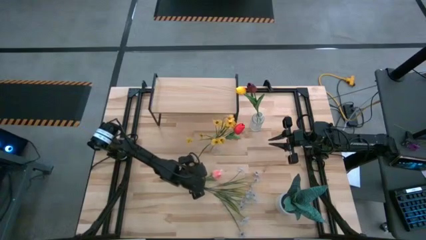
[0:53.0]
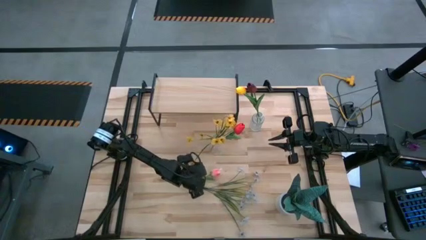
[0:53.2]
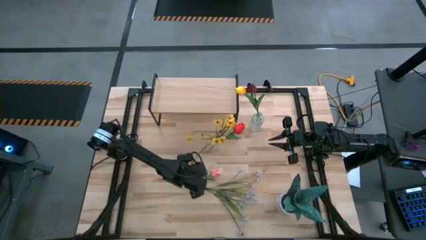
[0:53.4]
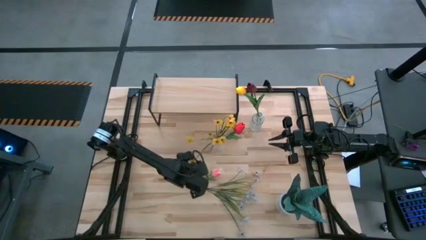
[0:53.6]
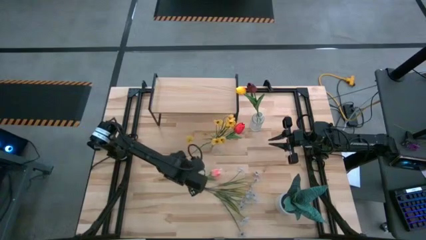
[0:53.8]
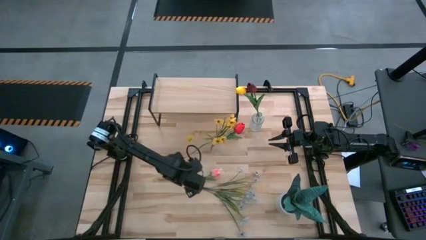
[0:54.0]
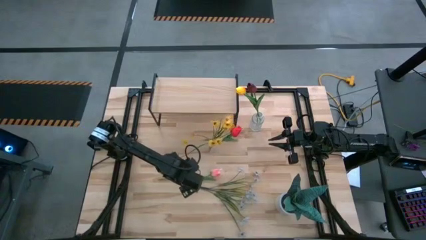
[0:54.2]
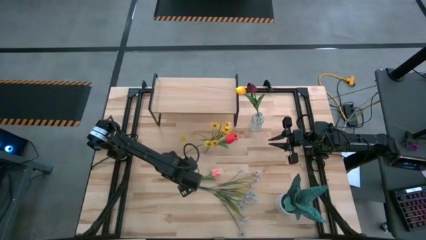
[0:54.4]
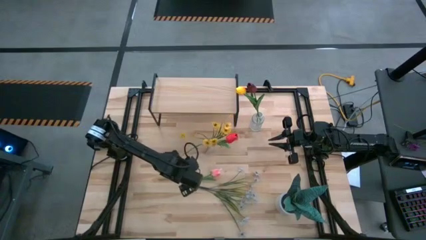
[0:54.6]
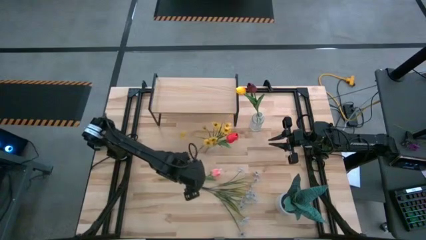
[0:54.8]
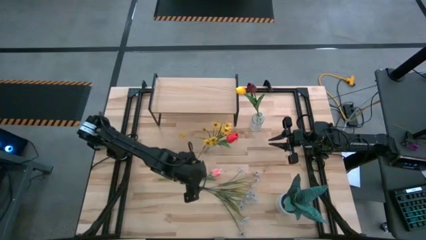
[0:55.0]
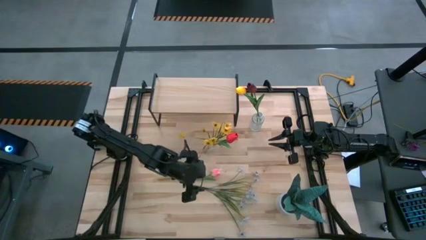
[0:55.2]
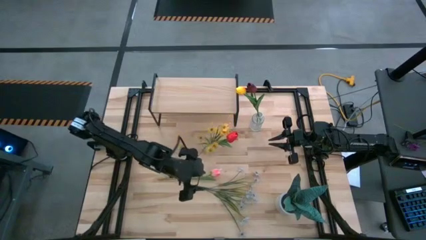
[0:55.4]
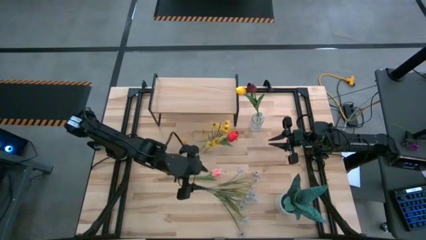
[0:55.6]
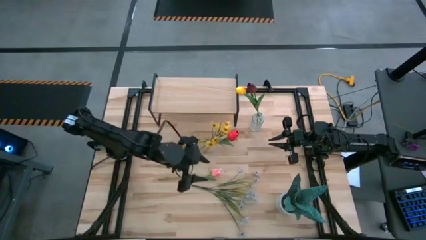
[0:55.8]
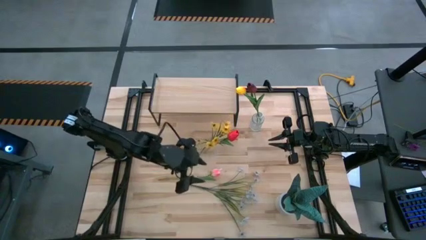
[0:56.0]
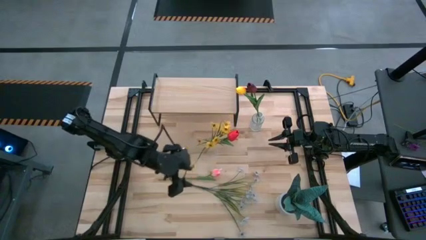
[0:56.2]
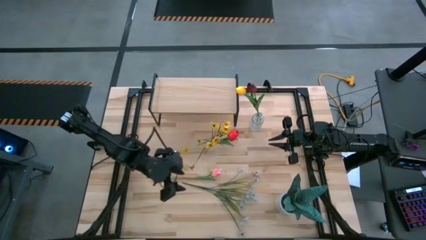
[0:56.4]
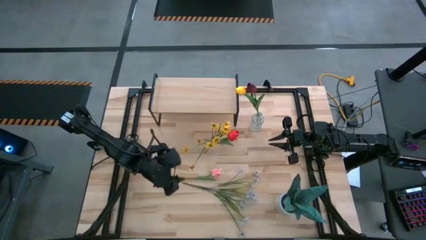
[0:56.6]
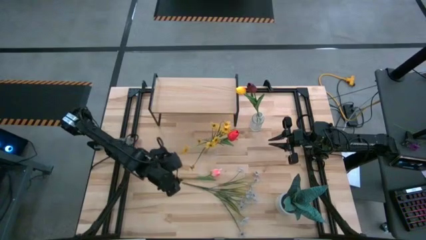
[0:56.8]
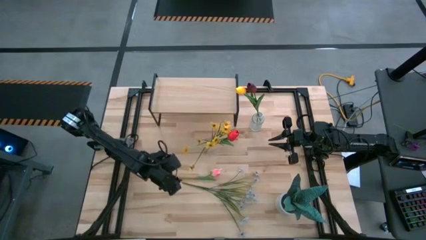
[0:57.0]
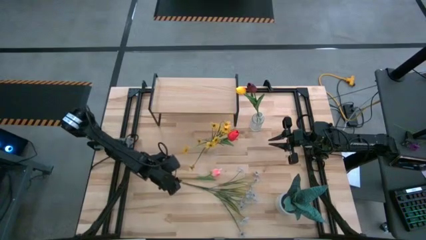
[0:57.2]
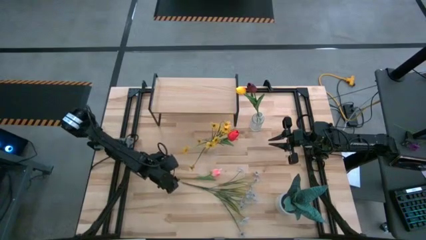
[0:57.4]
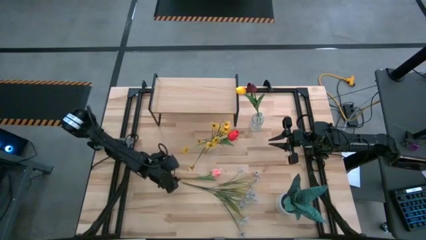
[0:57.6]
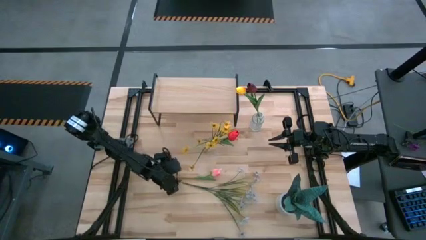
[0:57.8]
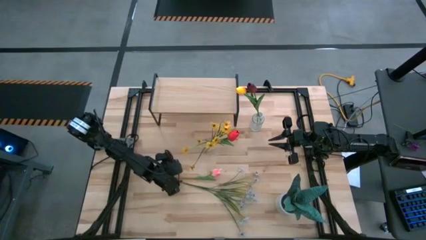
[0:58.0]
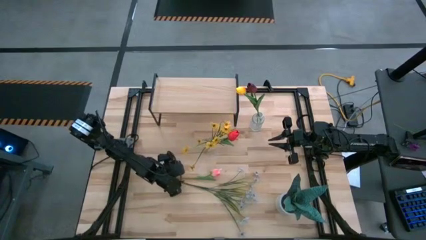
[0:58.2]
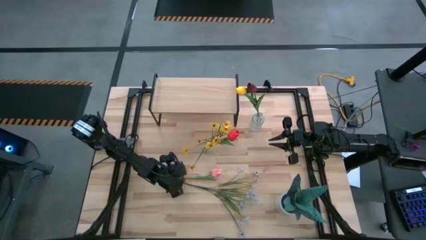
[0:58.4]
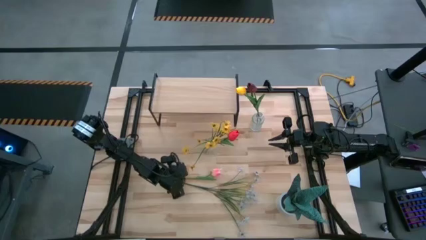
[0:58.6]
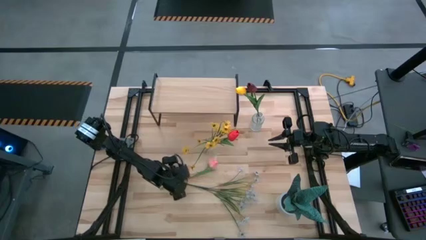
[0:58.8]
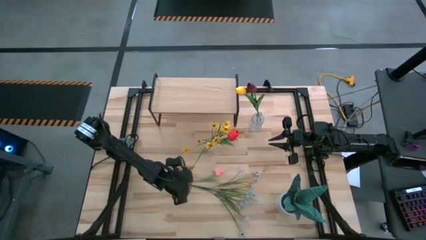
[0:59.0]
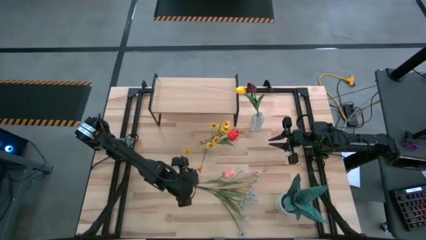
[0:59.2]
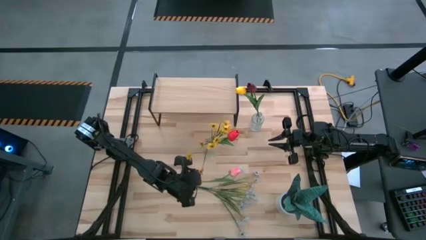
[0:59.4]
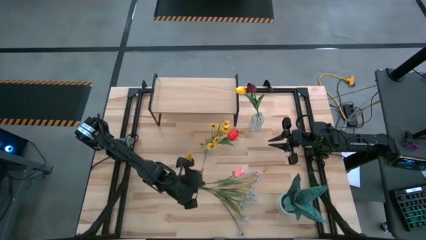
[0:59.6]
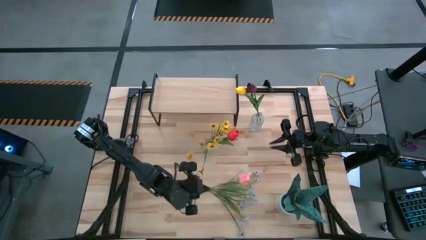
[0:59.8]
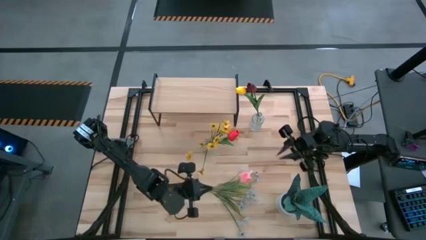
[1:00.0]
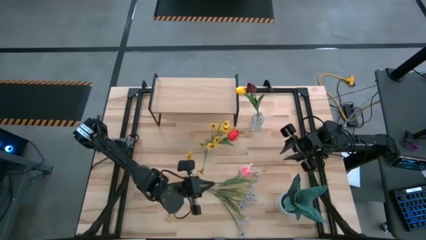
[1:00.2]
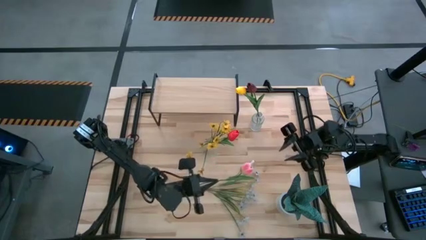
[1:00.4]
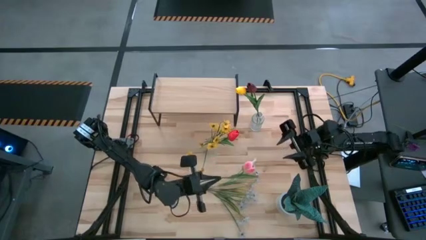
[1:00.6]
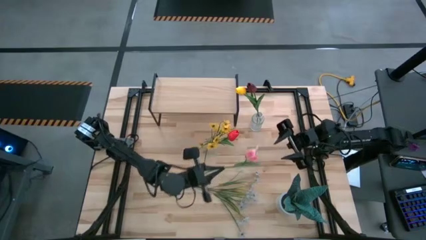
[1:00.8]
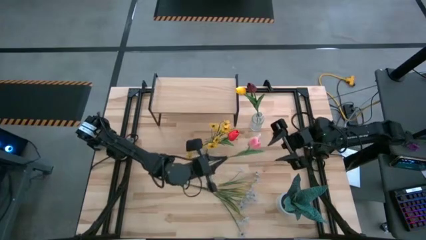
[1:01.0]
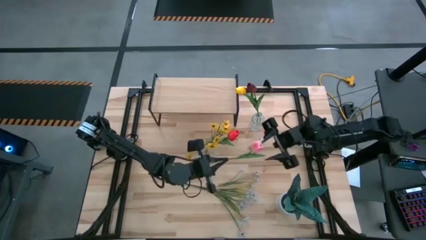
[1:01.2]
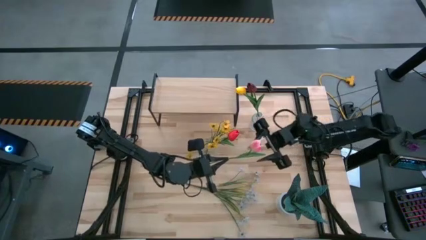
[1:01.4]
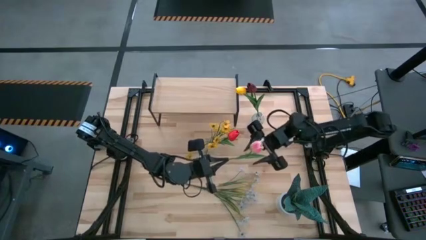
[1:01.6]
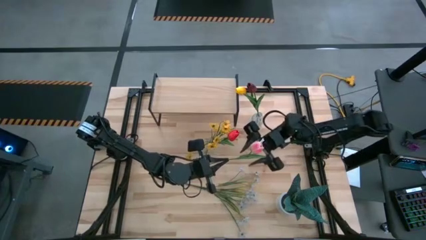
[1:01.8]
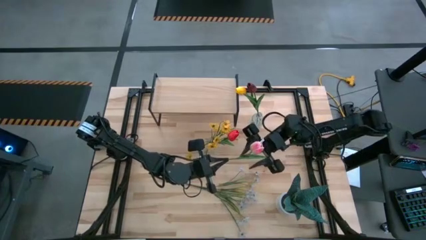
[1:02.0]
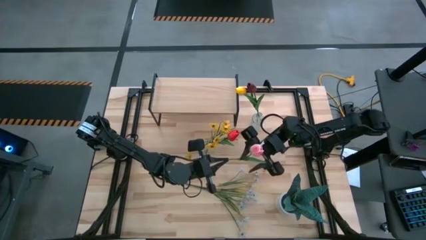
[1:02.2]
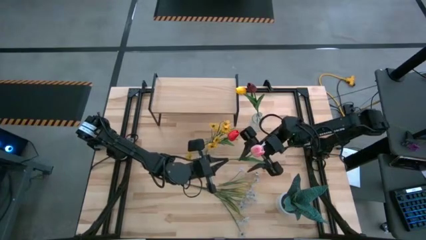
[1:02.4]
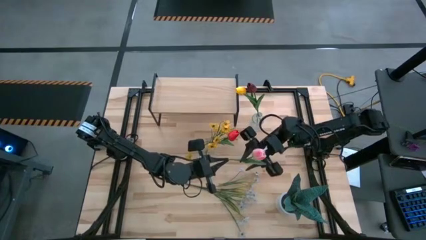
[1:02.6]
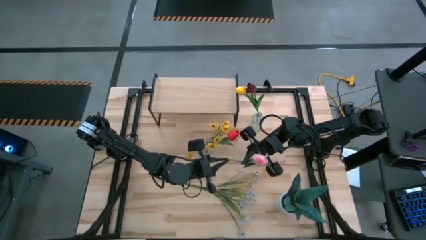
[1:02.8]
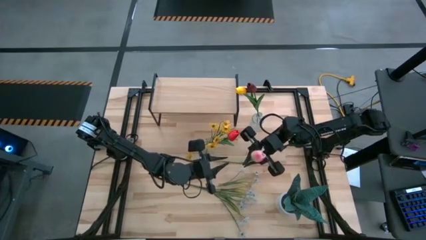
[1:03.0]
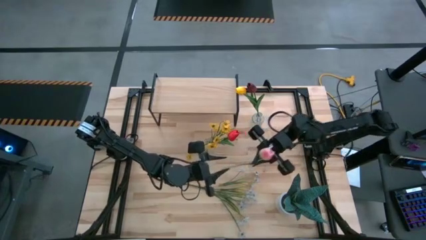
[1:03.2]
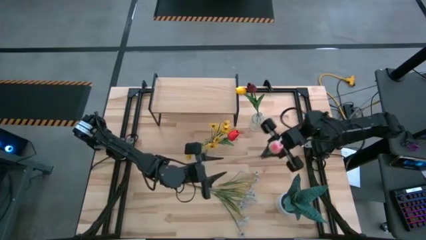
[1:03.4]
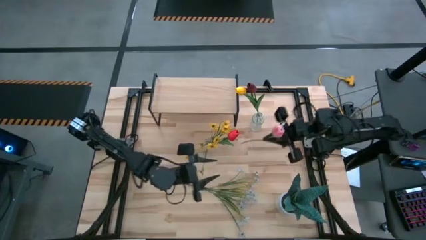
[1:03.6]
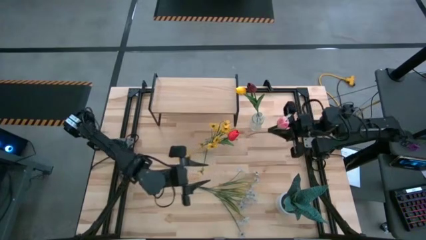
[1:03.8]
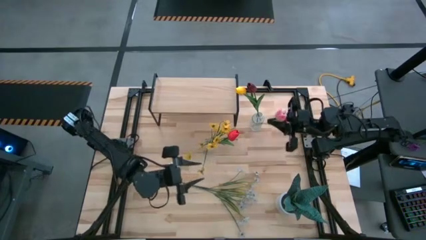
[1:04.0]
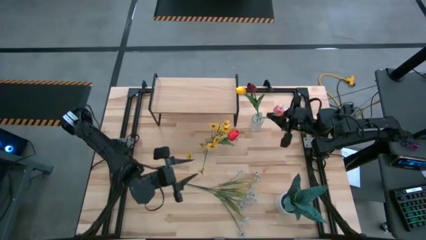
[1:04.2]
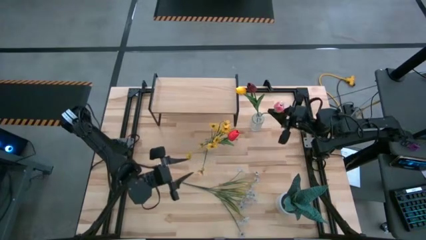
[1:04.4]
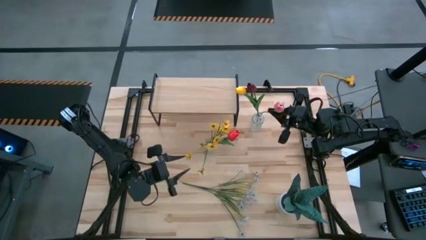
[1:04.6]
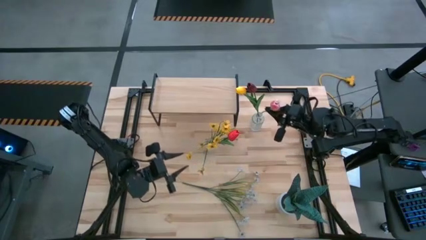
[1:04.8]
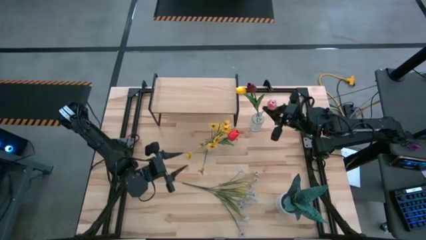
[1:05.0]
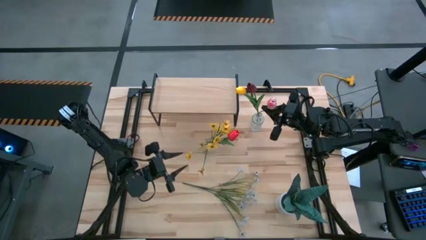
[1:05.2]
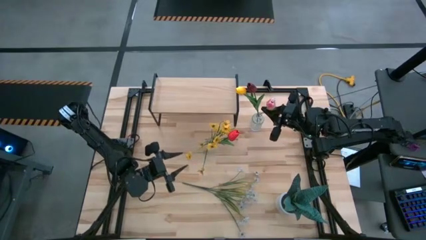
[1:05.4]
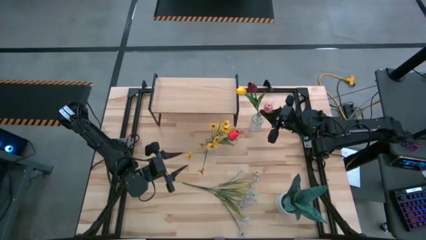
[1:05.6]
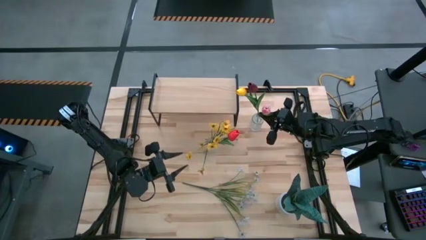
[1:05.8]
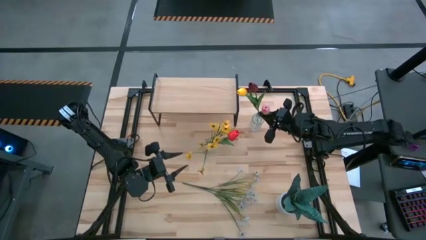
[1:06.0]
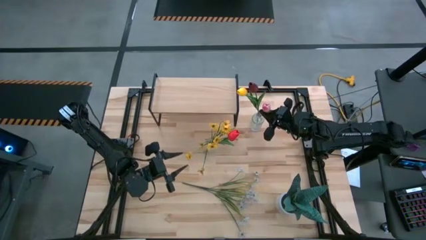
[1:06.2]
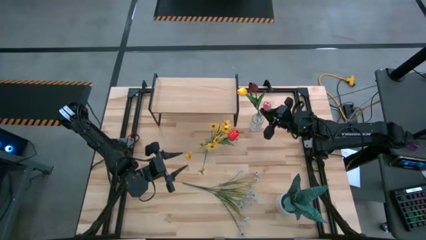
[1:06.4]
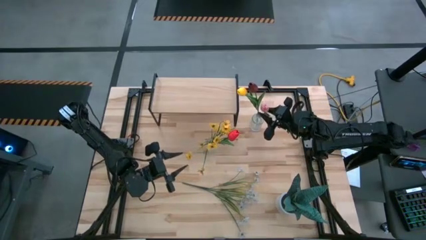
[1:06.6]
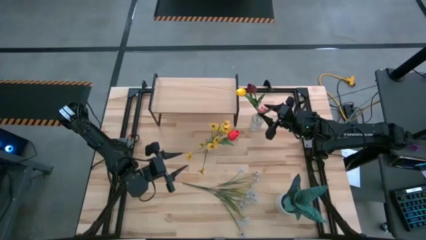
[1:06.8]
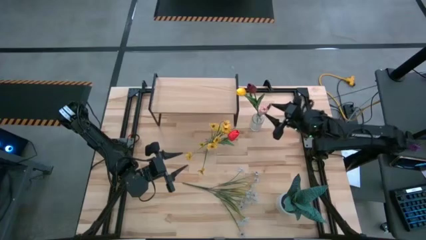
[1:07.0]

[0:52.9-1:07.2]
Task: Pick and place flowers into a vace then onto a shelf
Put the pink tulip into the top transparent vase

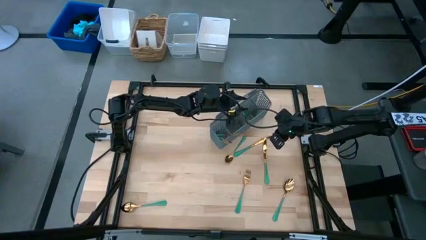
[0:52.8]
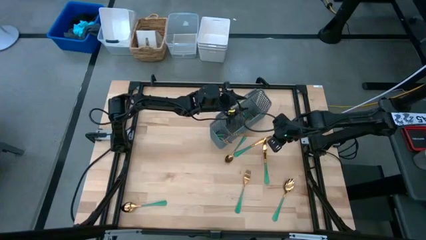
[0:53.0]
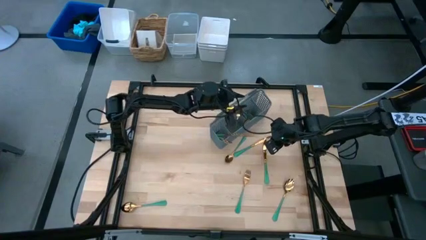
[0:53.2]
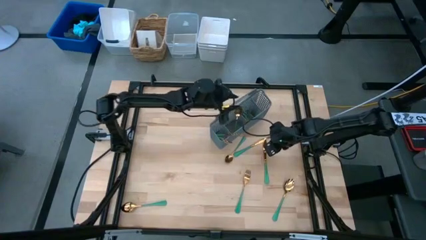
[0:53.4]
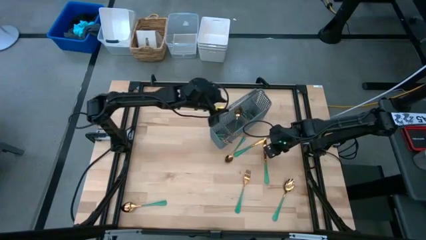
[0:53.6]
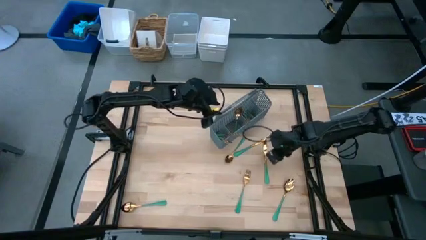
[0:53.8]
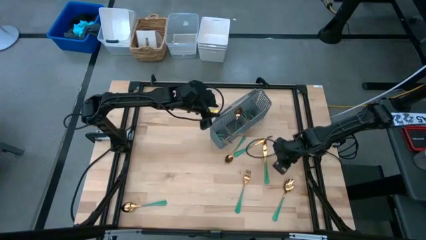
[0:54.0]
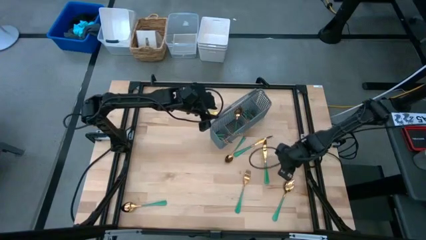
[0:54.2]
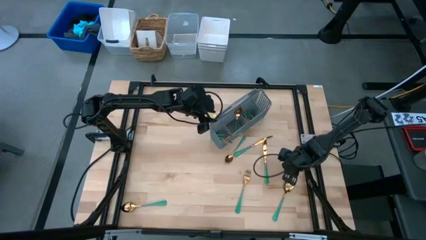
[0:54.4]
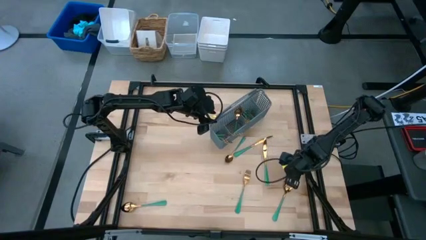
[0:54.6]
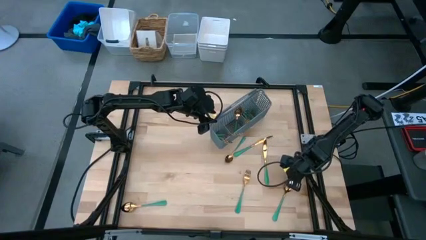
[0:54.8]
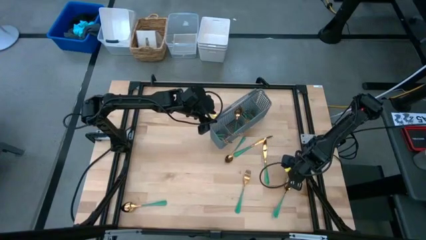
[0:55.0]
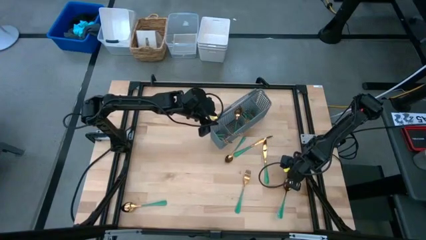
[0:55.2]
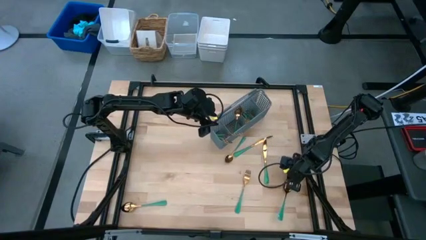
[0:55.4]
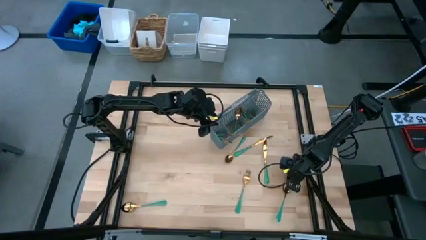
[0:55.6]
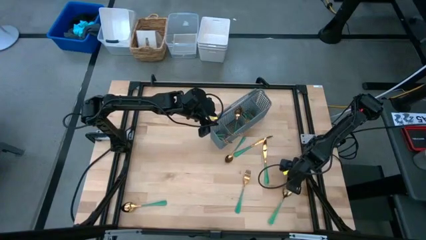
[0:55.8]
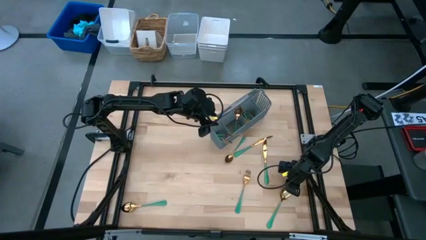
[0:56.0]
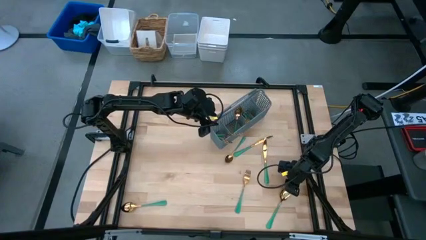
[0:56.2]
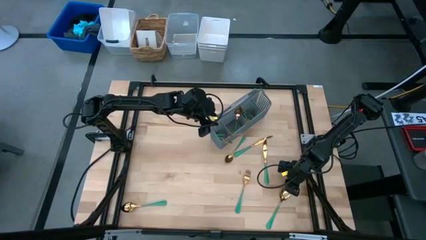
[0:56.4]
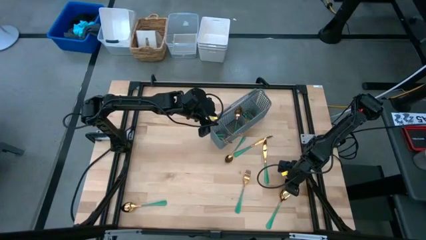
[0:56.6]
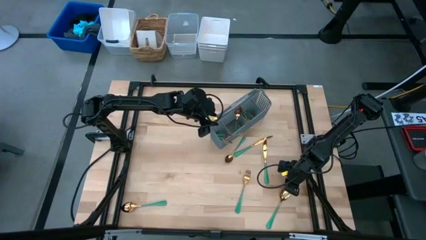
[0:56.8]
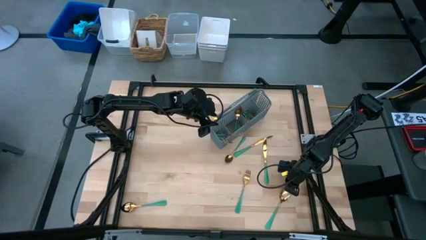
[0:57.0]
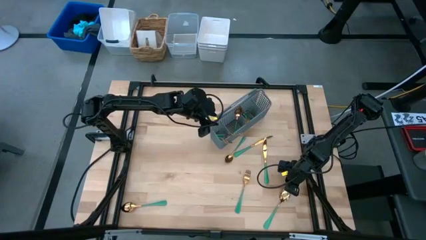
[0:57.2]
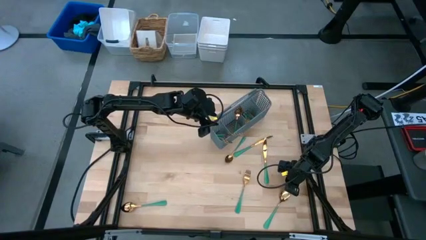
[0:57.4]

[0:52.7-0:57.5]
Task: Sort silverware
Put the bottom left spoon into the basket
